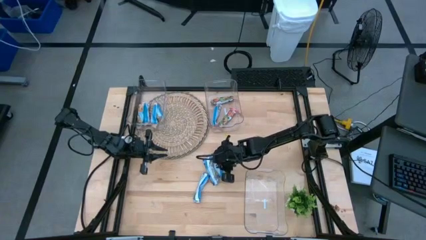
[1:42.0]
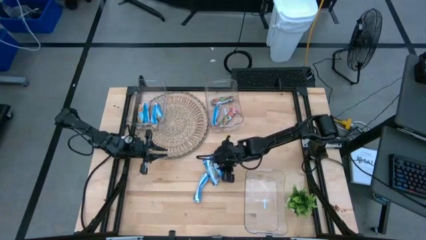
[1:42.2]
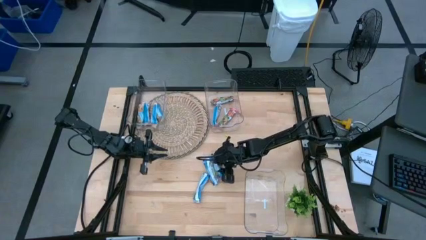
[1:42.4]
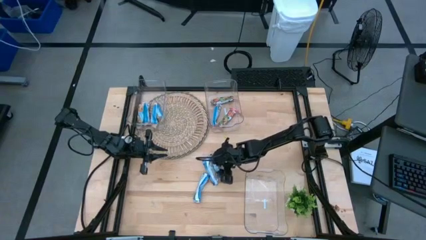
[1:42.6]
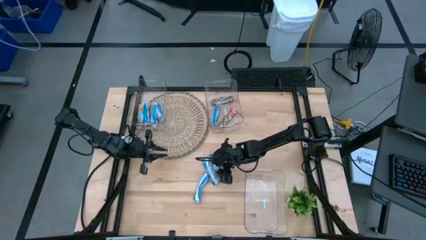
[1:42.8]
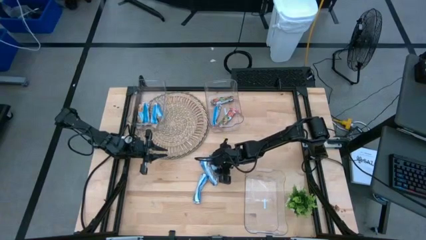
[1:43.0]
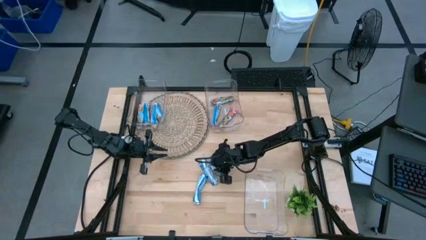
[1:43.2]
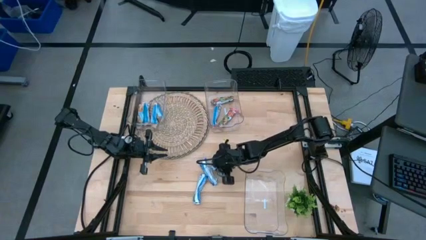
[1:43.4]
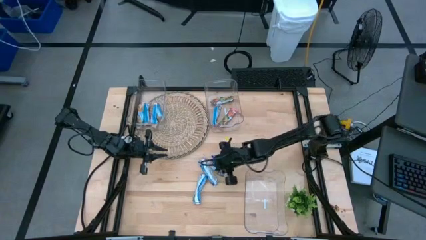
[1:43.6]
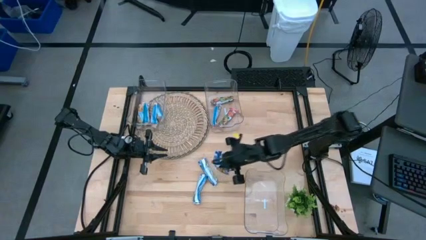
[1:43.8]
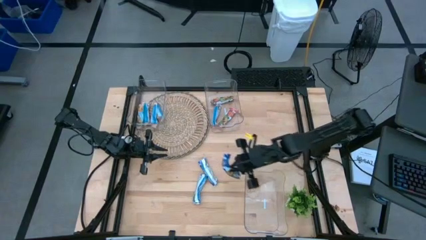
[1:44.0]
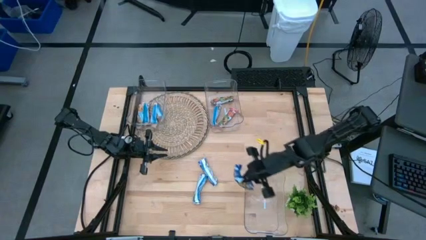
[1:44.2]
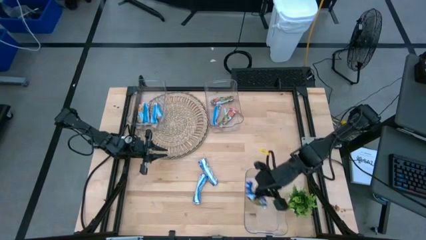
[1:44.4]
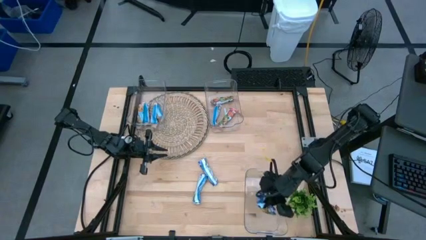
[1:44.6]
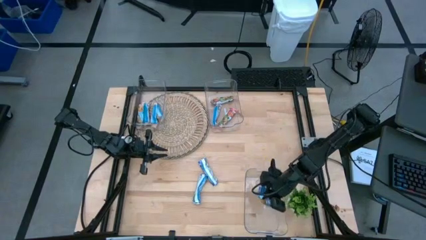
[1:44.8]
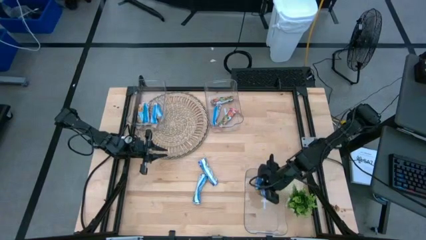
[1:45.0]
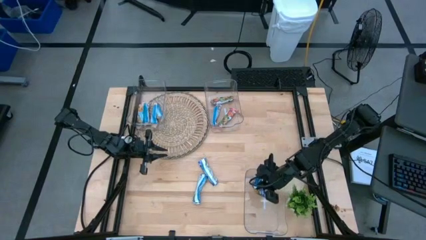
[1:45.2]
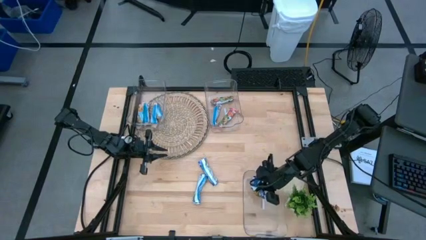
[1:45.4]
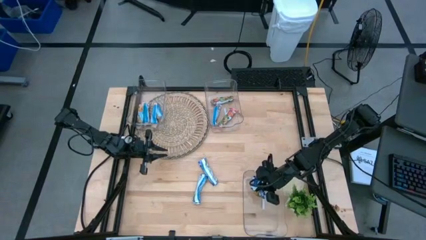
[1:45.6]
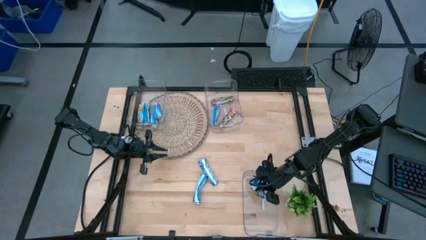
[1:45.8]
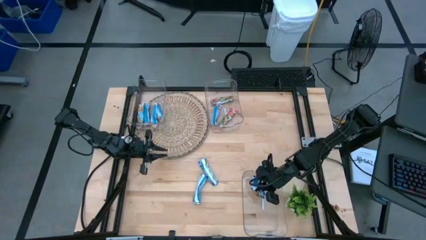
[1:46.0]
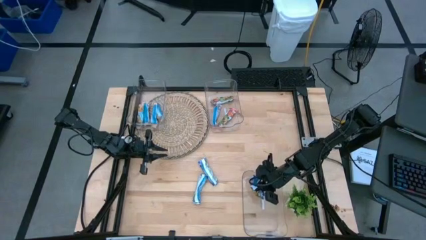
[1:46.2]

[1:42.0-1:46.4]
Task: Pick and place Granola Bars by type
Put the blue granola bar into the bottom transparent bin

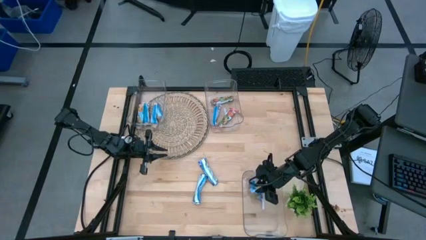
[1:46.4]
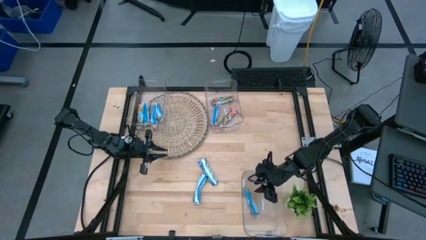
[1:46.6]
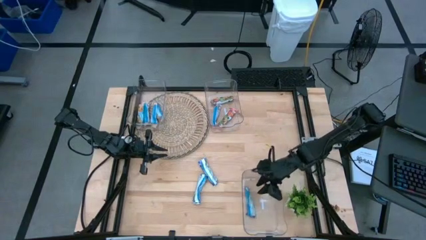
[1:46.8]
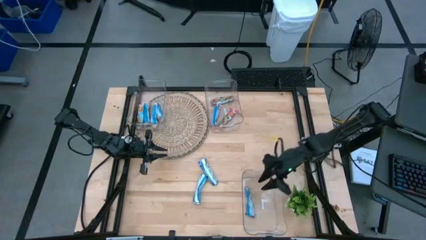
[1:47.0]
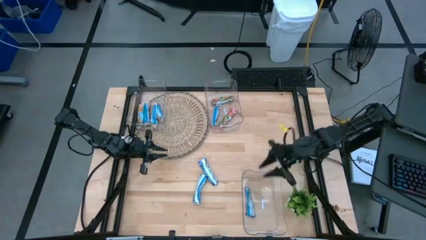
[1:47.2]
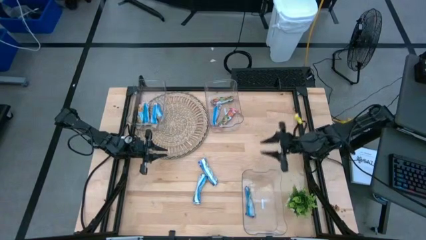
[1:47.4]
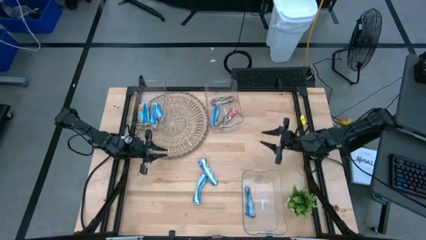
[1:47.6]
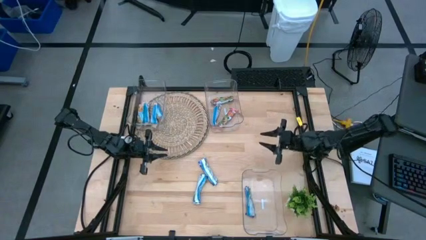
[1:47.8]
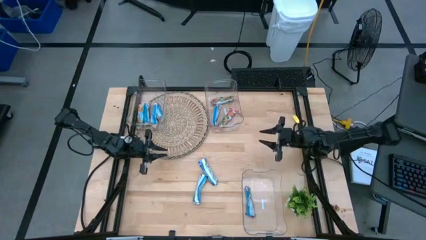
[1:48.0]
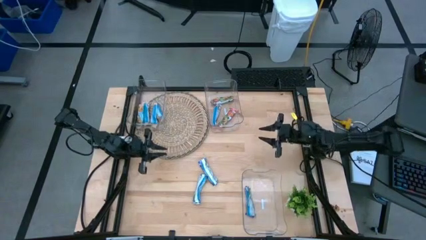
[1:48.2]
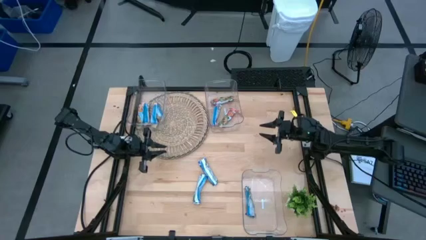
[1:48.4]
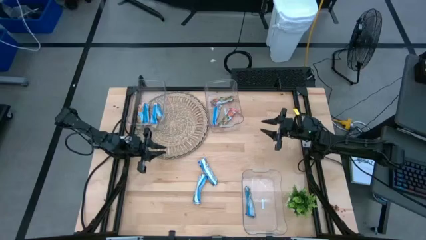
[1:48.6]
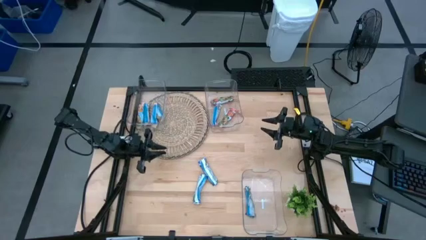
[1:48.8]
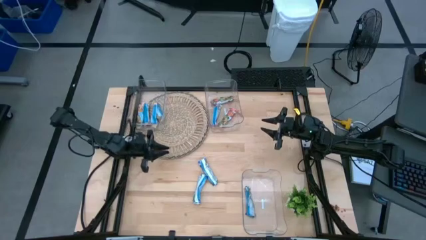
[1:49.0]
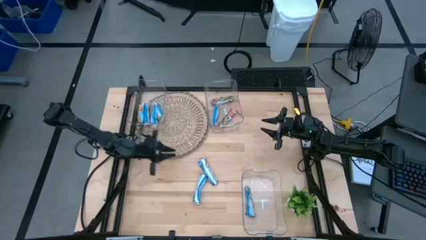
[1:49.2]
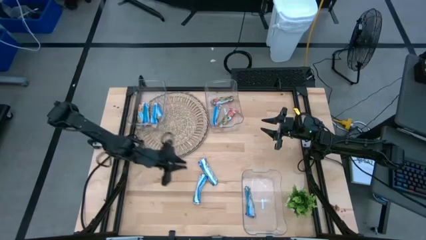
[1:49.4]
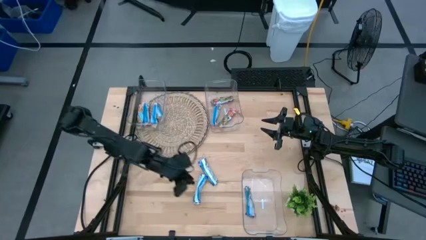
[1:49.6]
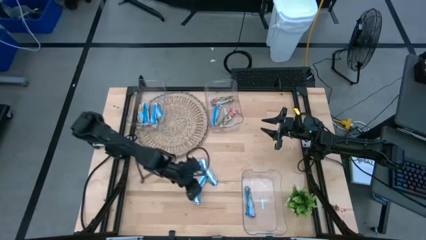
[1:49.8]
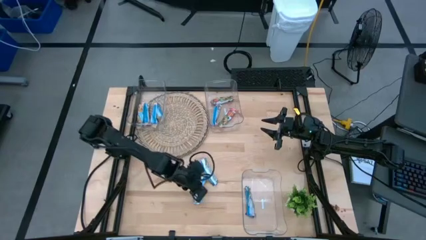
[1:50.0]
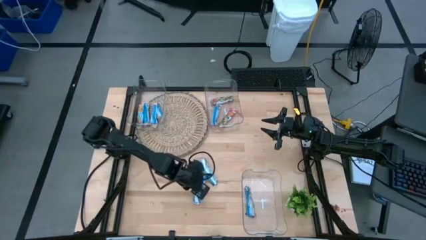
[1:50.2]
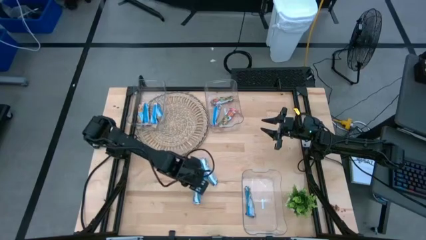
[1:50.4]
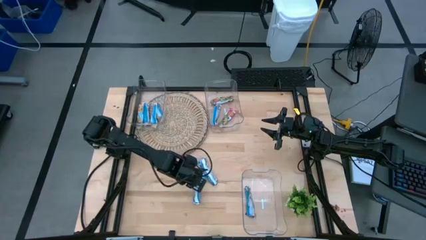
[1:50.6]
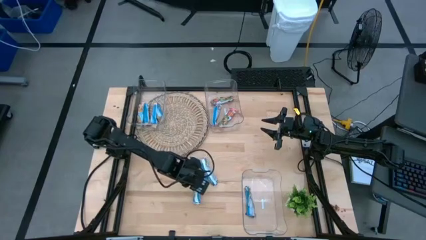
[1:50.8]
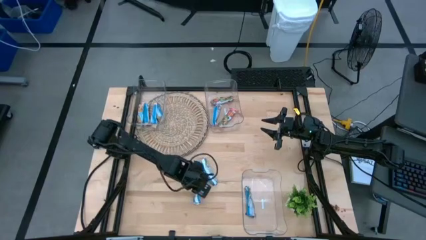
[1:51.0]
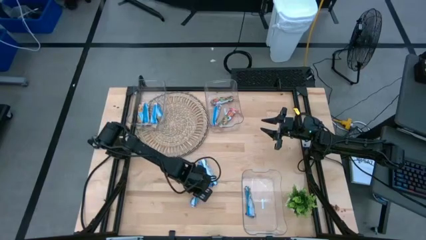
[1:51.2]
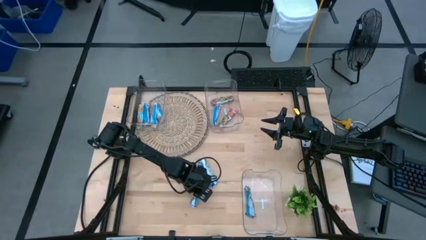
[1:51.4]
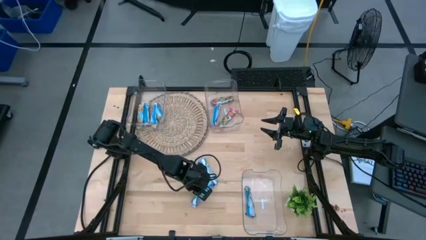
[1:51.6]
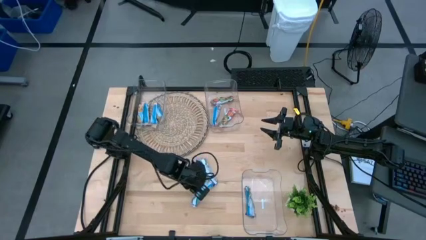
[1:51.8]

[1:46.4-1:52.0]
Put the blue granola bar into the bottom transparent bin

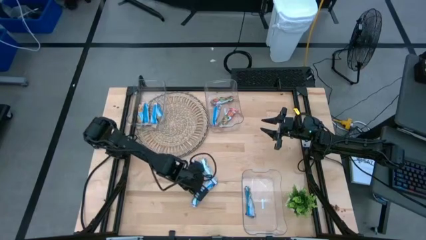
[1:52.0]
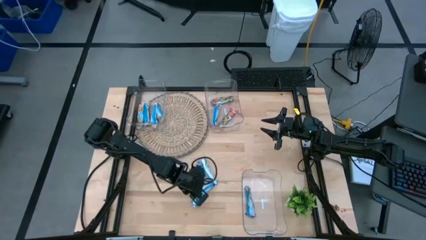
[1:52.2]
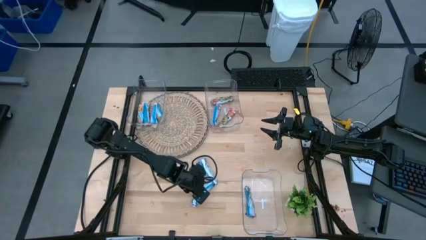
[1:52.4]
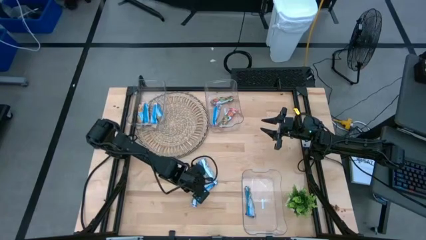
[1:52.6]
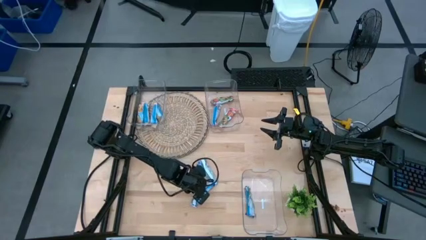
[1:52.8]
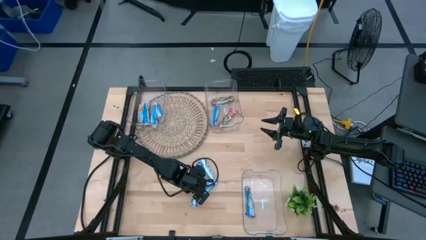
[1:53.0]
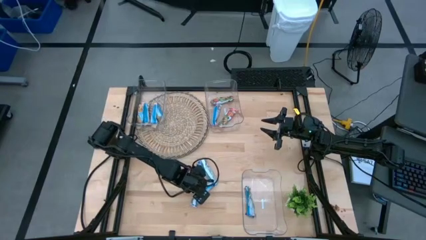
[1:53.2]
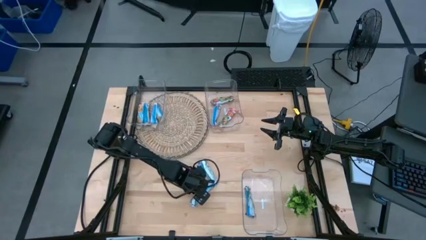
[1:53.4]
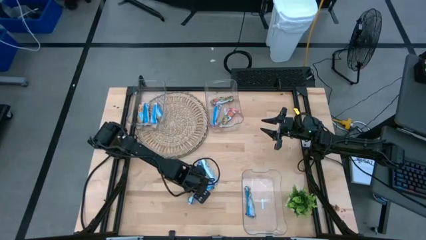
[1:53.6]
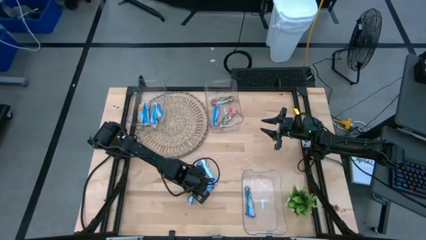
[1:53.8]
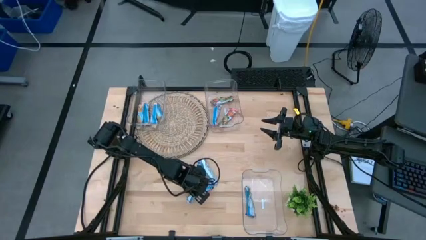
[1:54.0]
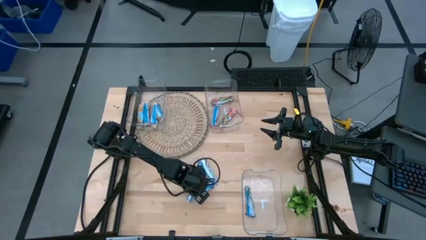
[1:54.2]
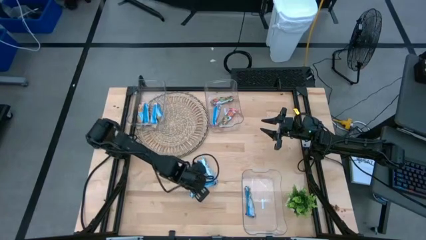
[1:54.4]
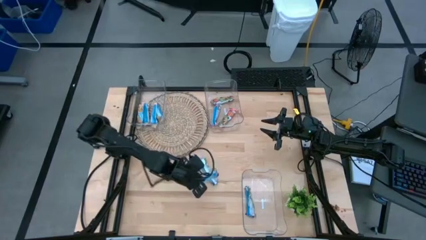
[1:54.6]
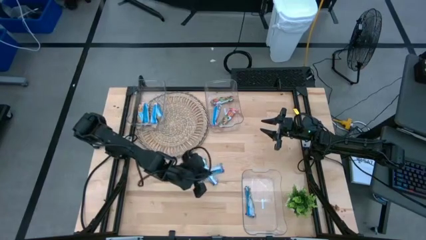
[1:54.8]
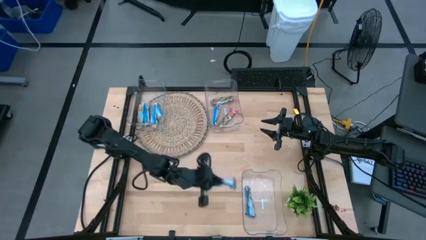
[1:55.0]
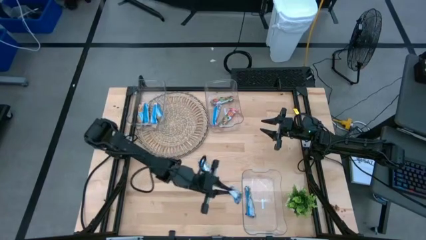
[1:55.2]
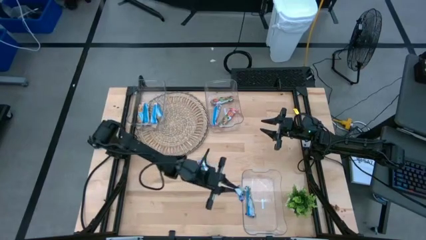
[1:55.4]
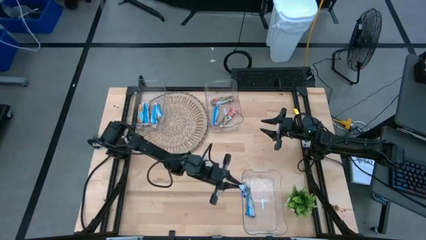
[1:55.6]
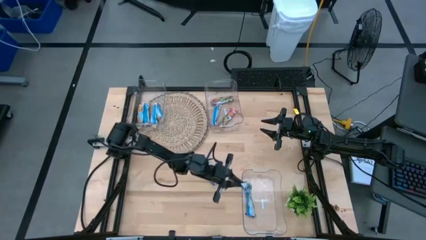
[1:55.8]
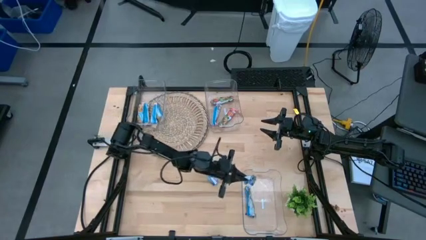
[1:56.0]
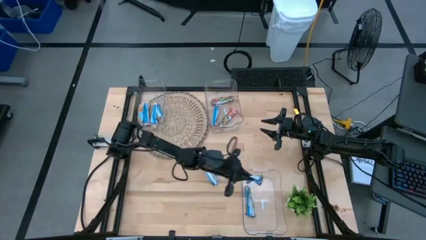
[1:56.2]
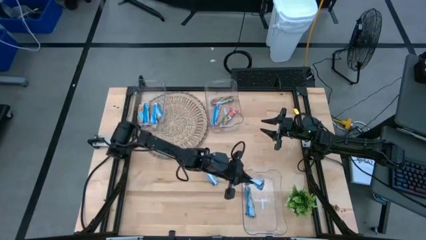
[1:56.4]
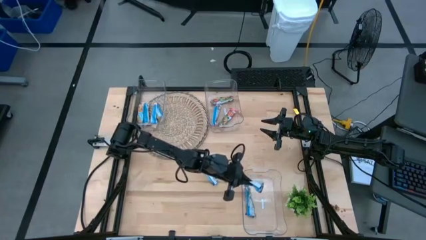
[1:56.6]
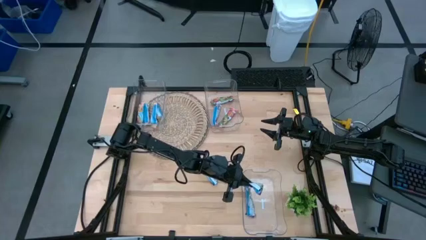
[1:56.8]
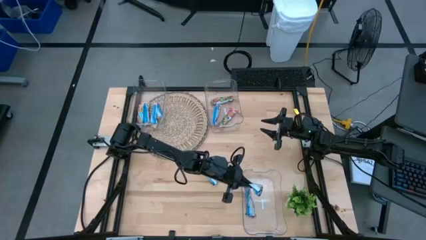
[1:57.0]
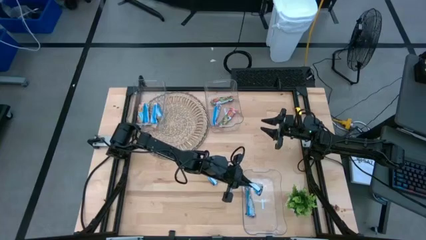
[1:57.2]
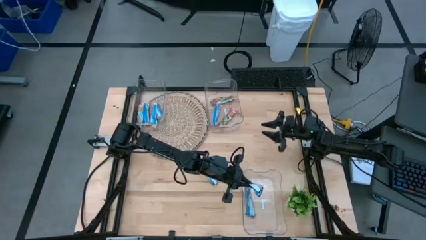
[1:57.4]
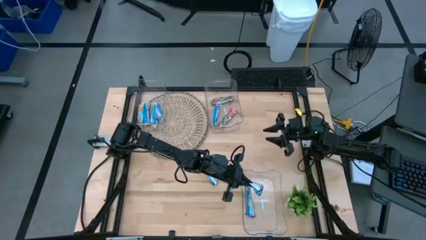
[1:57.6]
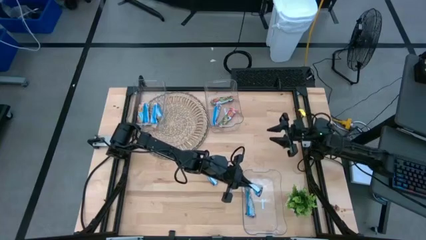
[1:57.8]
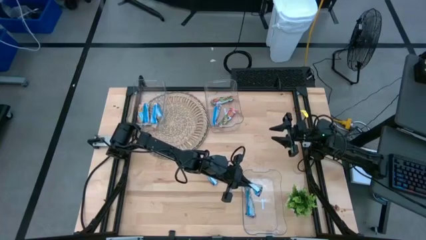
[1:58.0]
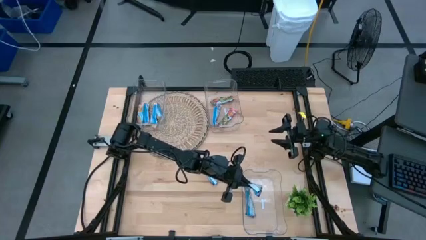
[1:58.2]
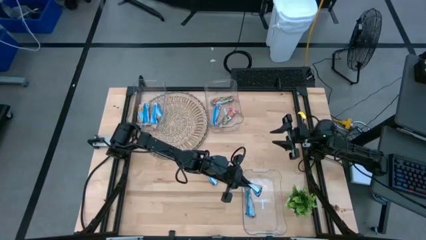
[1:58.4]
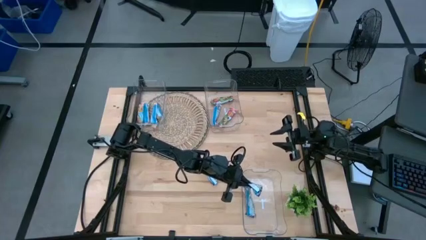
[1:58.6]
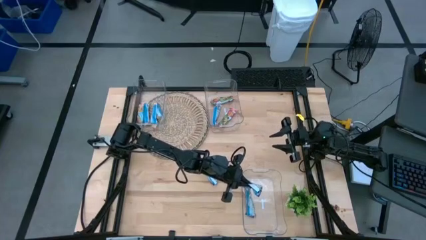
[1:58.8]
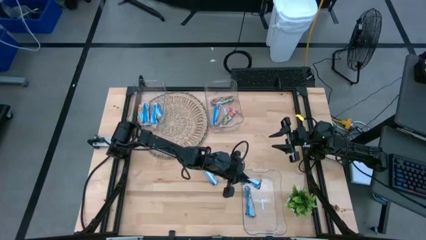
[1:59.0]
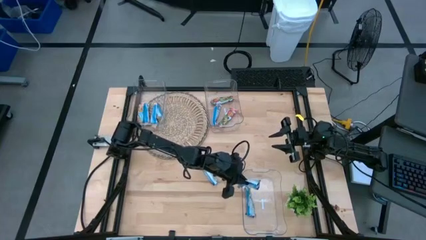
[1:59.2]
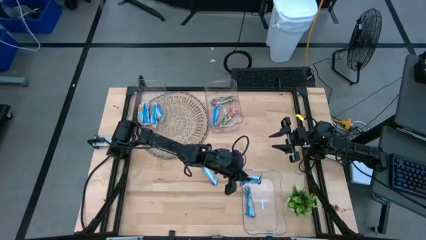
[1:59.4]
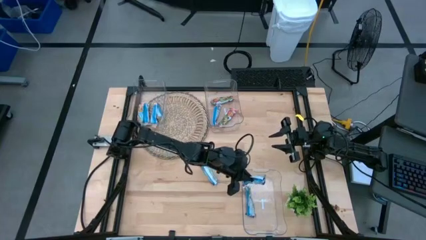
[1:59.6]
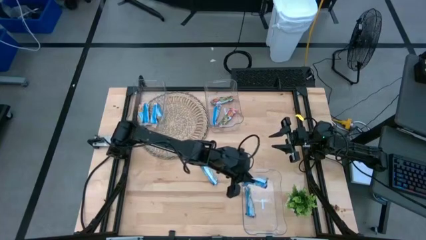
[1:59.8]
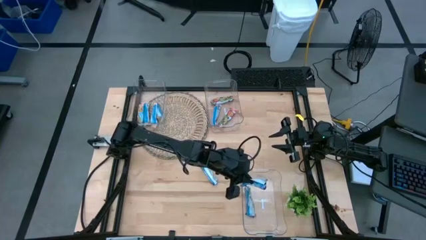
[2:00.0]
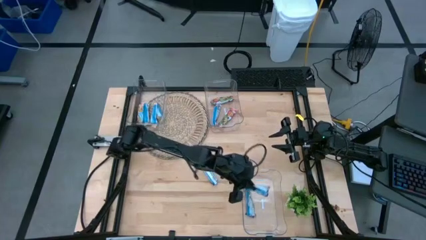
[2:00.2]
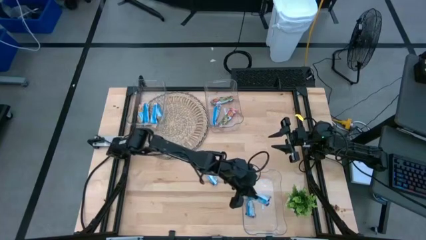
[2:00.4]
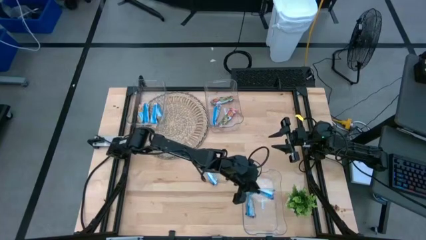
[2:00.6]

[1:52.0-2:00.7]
Put the blue granola bar into the bottom transparent bin
